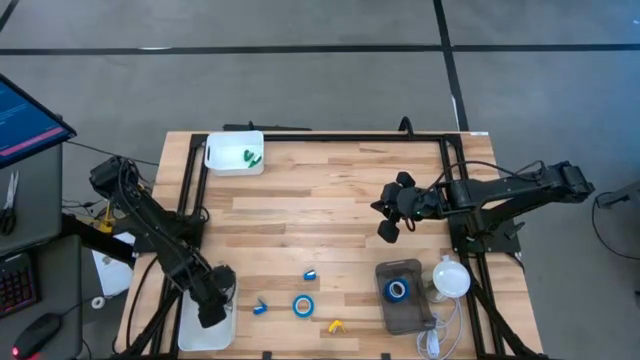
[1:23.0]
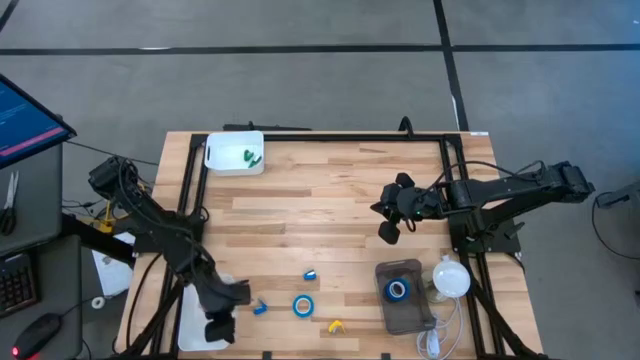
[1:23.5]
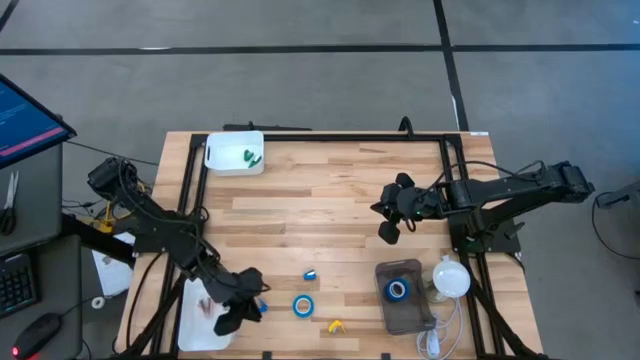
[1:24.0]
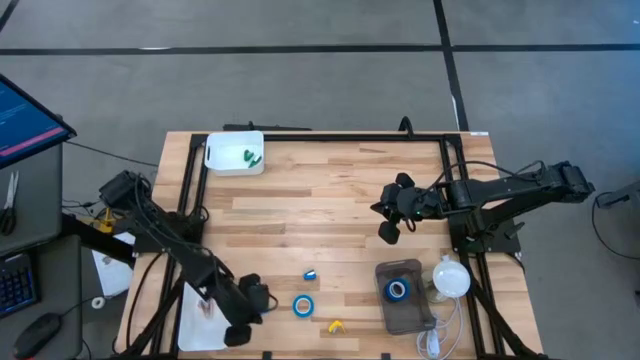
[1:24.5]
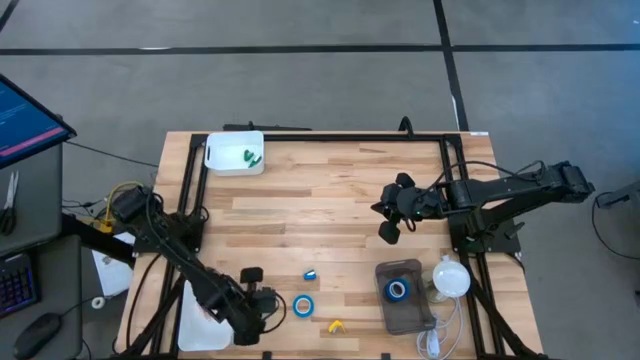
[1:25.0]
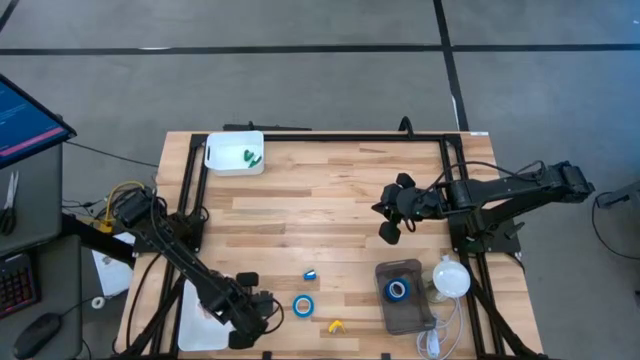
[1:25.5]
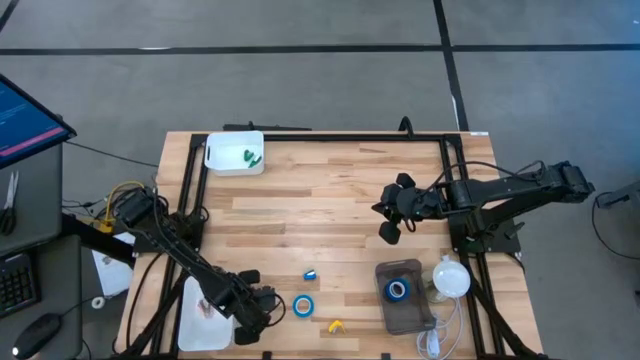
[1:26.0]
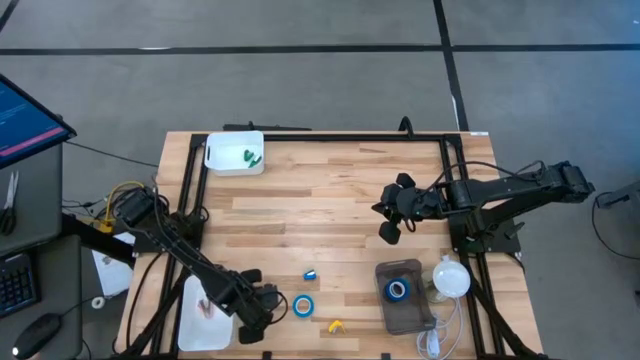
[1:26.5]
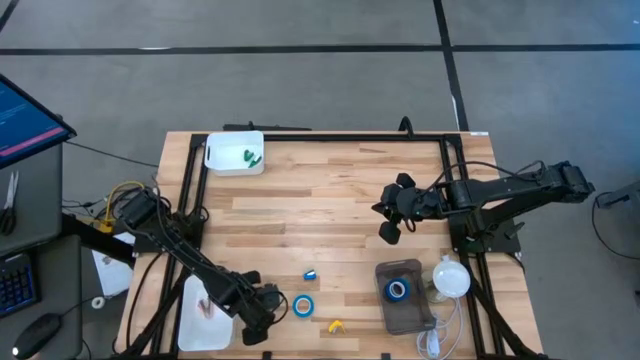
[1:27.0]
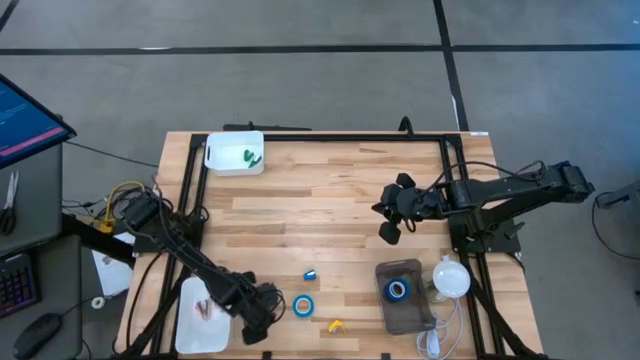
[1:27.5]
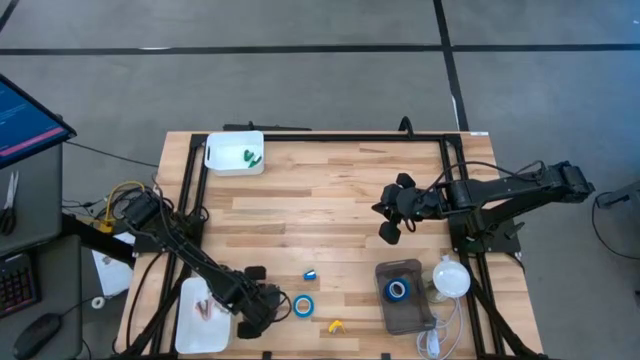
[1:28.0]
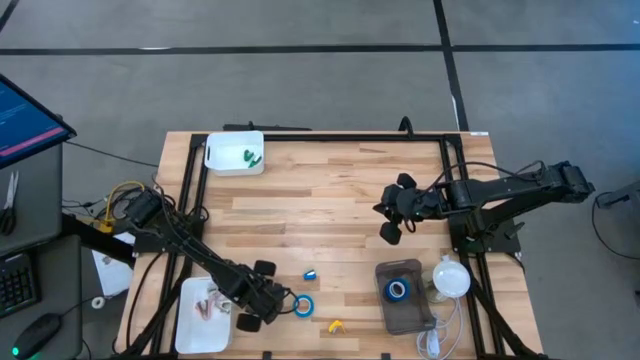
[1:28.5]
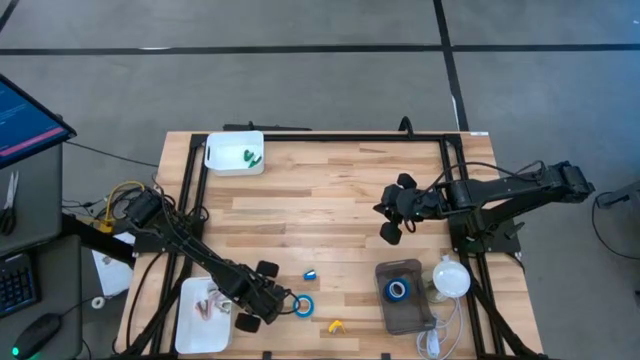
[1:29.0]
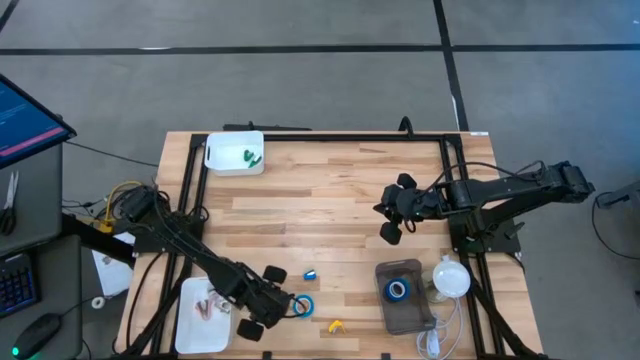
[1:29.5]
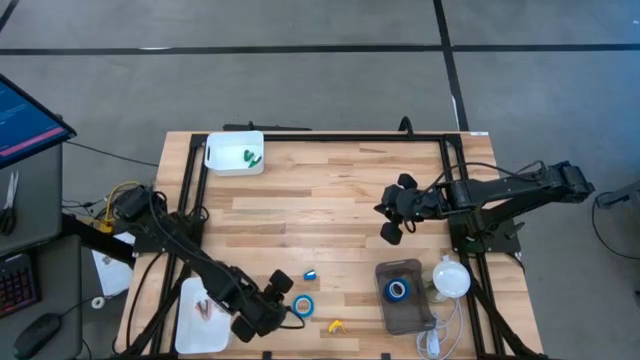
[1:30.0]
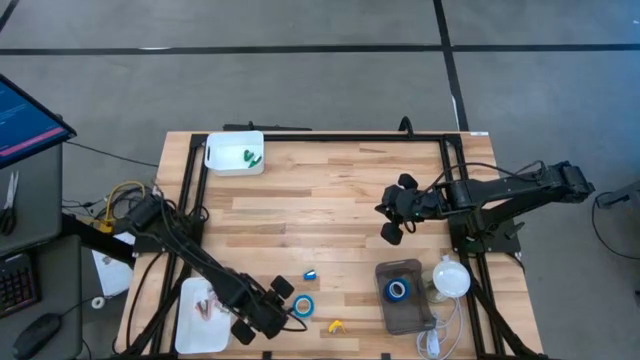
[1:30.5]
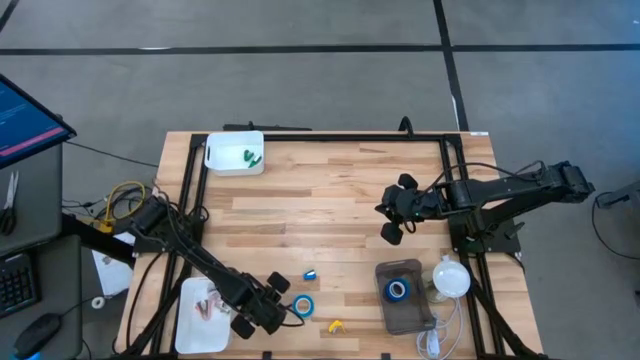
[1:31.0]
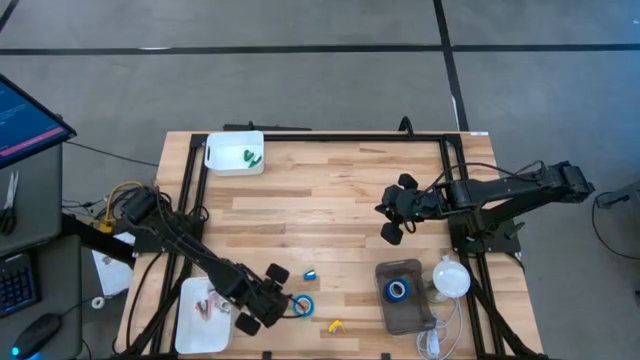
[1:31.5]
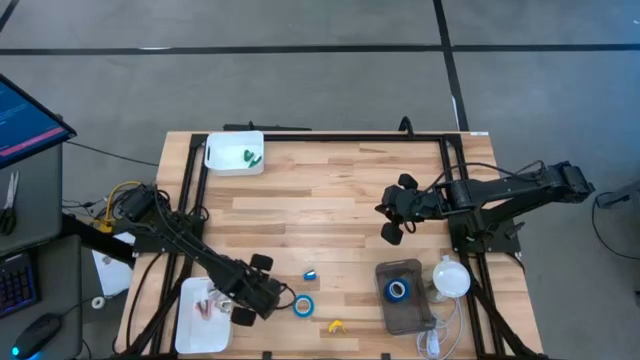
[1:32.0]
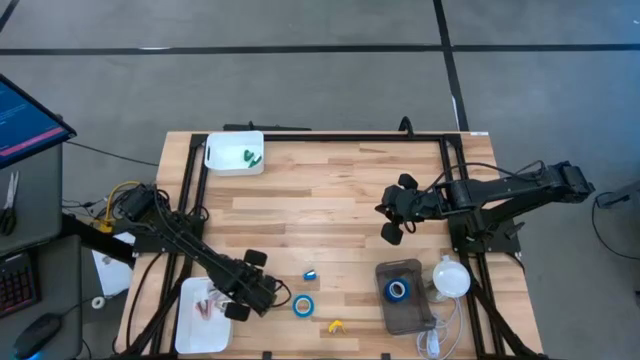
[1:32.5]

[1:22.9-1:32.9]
Task: Pick and place Stapler, Stapler remover, tape
Put the left blue stapler into the top white bin

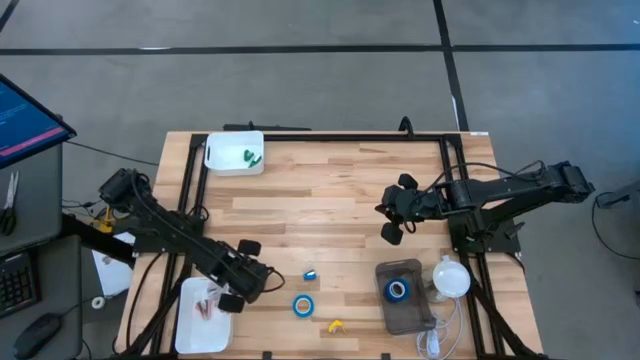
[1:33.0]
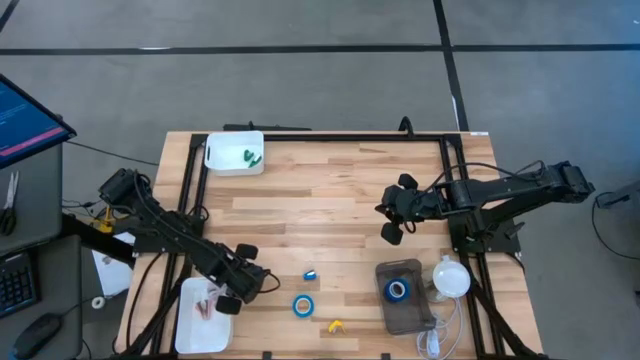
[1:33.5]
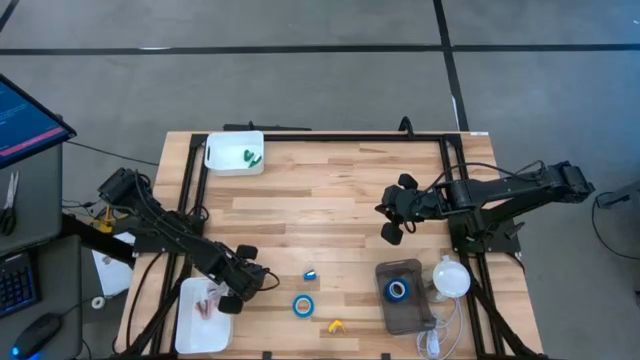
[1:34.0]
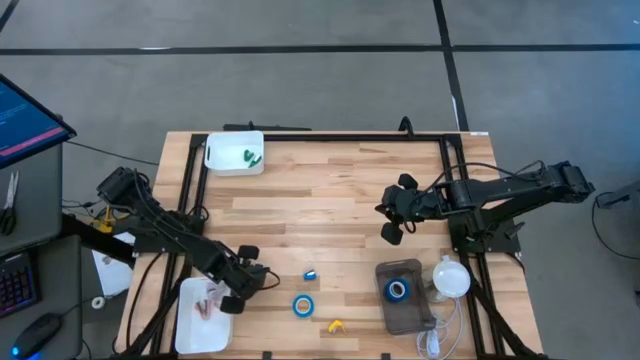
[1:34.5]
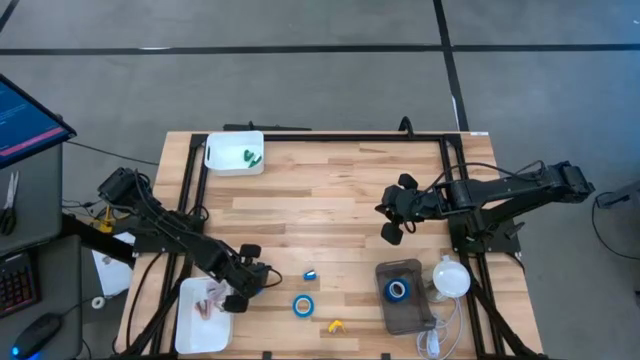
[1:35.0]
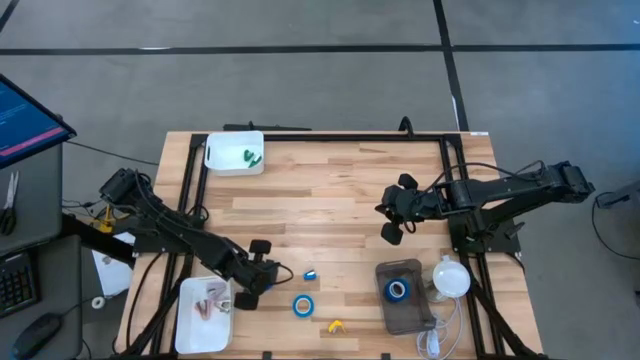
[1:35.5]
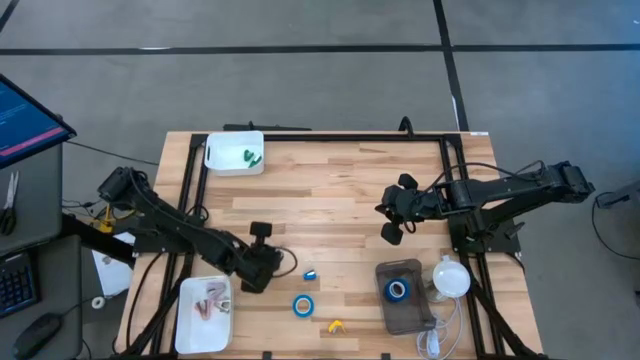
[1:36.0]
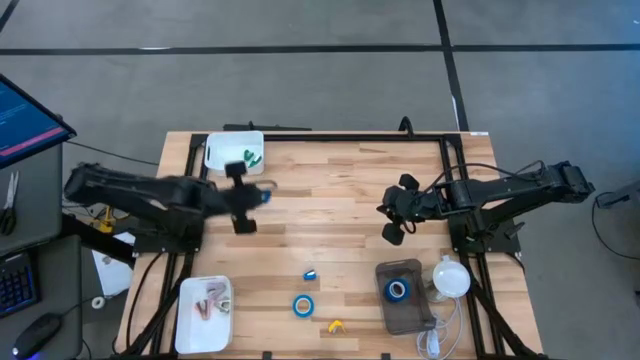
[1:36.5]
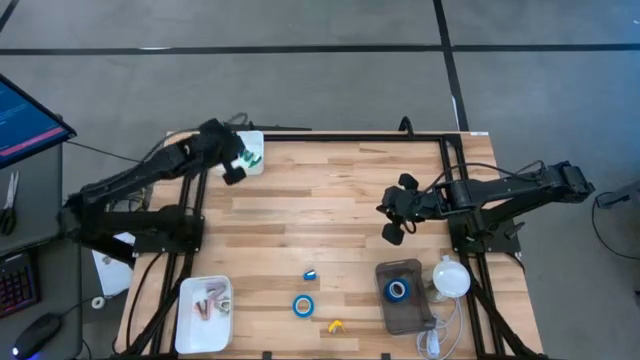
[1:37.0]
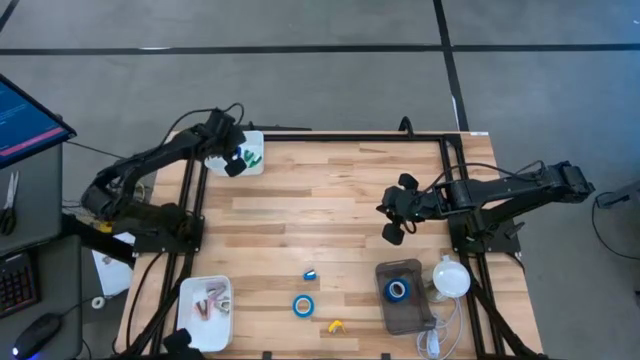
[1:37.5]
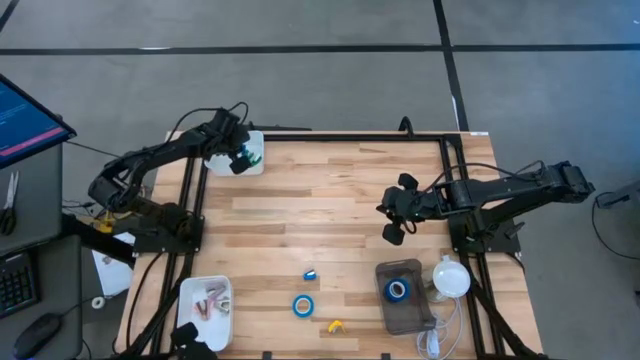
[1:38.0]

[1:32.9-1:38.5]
Put the left blue stapler into the top white bin

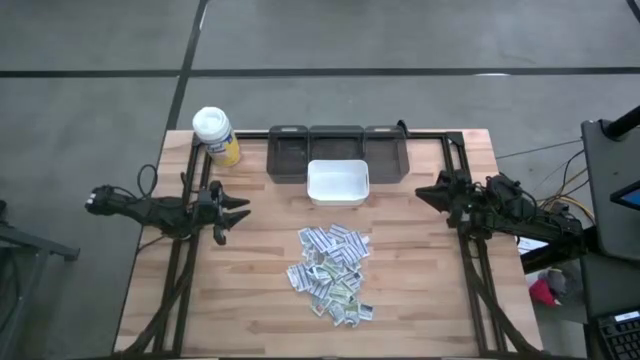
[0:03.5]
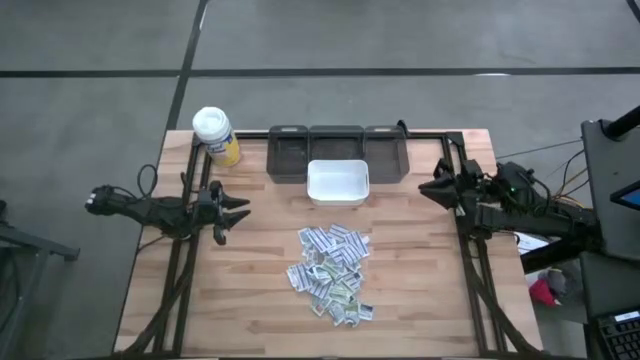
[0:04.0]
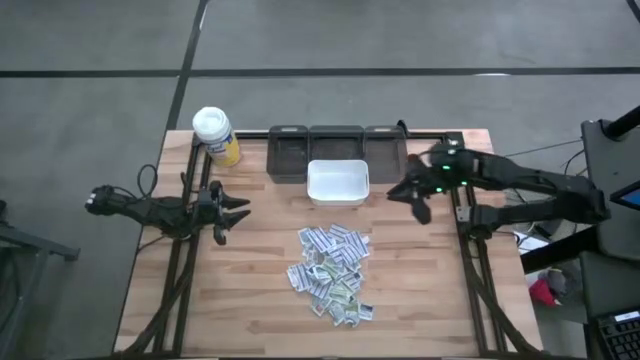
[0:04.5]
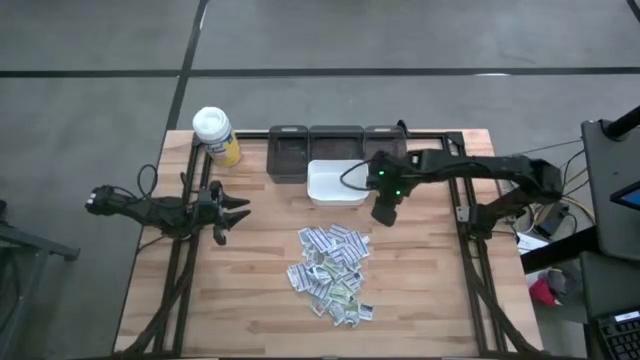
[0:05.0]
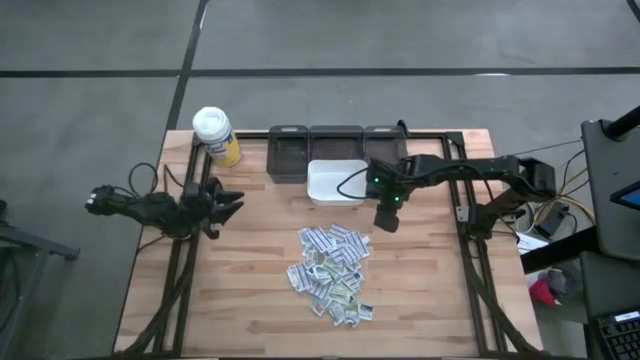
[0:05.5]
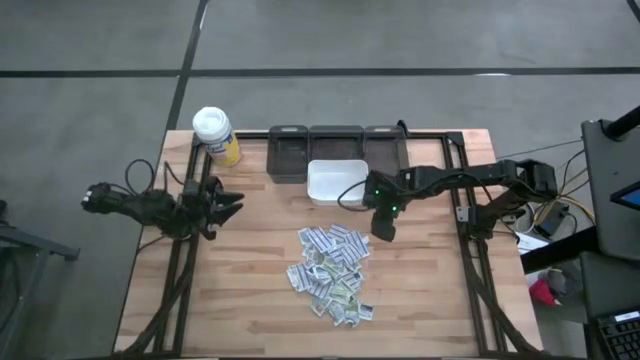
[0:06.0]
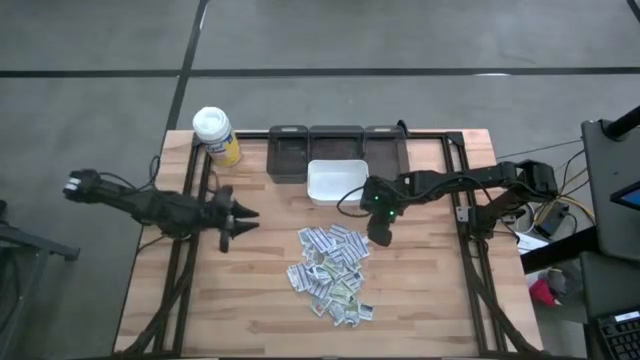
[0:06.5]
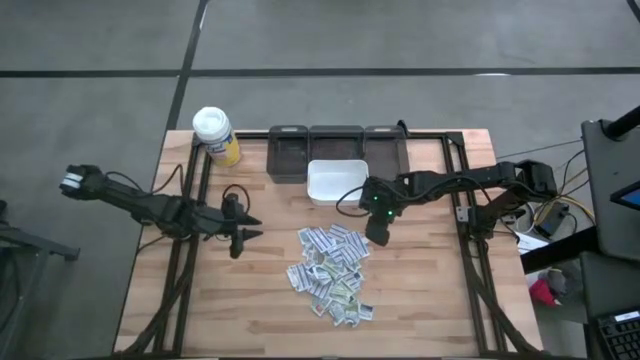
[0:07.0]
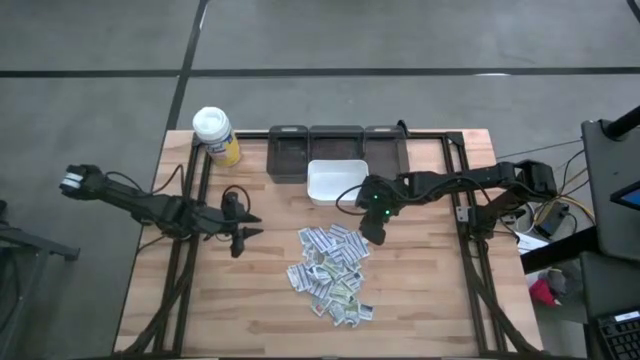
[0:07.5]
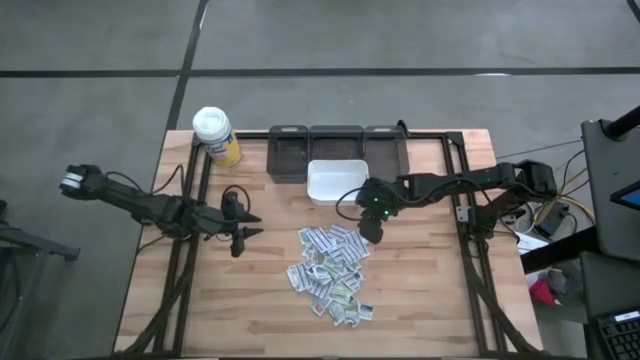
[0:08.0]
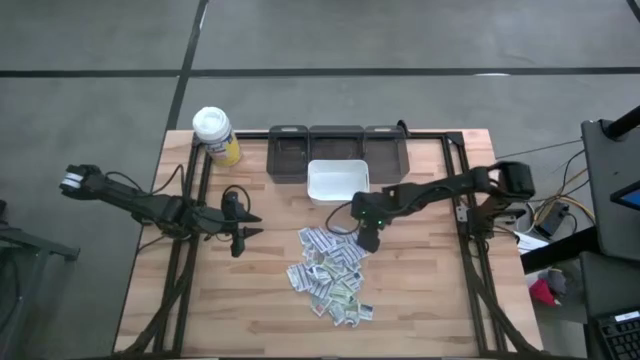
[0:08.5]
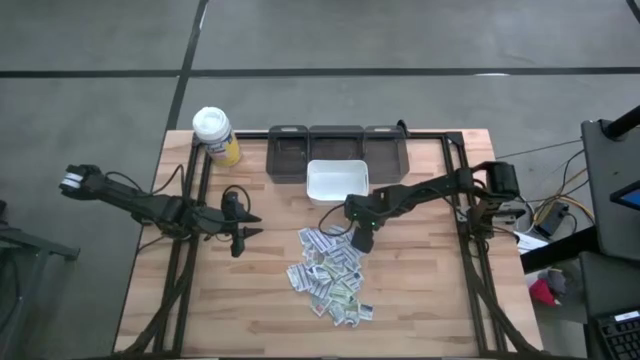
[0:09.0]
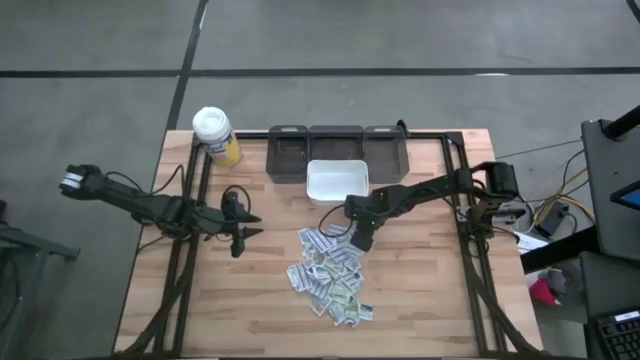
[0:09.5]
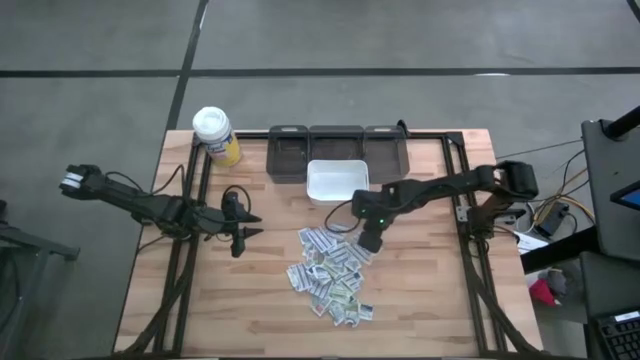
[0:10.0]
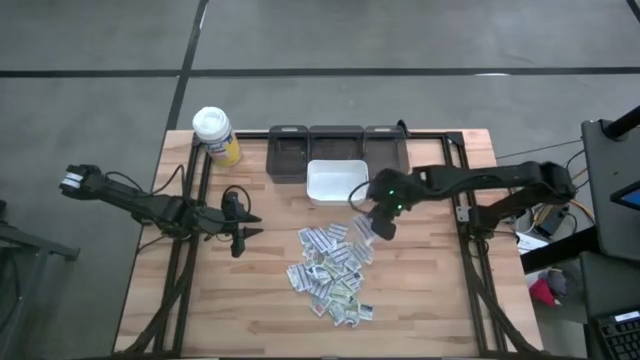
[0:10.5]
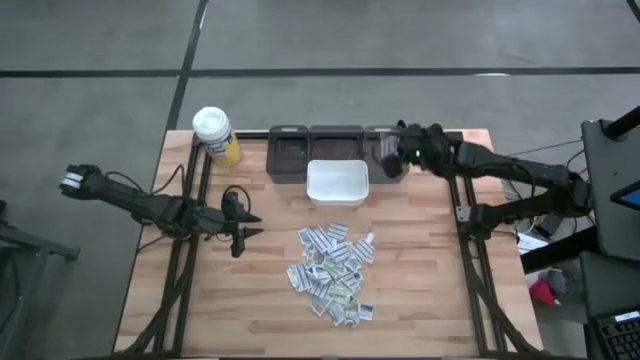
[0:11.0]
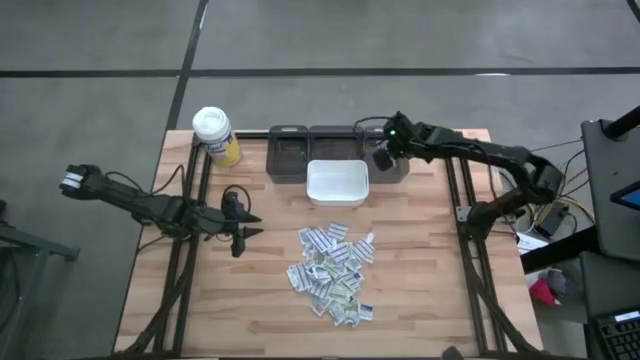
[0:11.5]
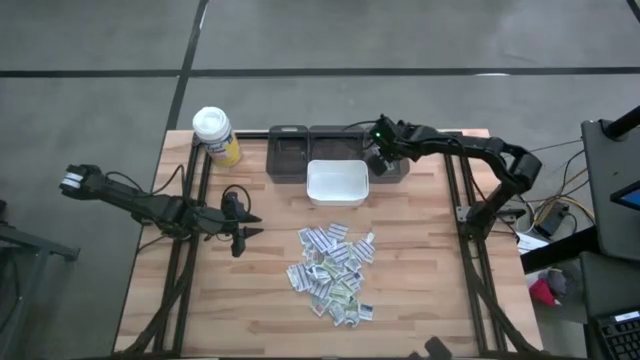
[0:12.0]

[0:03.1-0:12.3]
Task: Pick & Place First Aid Supplies
Put the blue bandage pack into the right black bin
